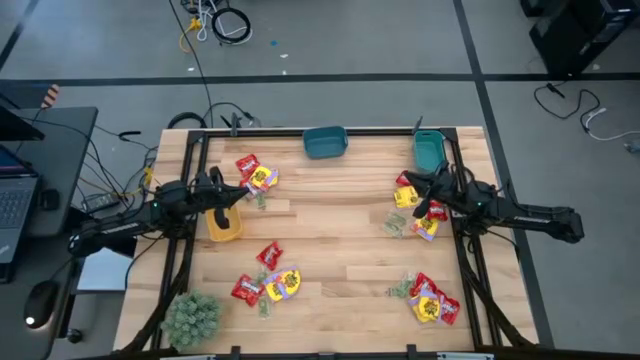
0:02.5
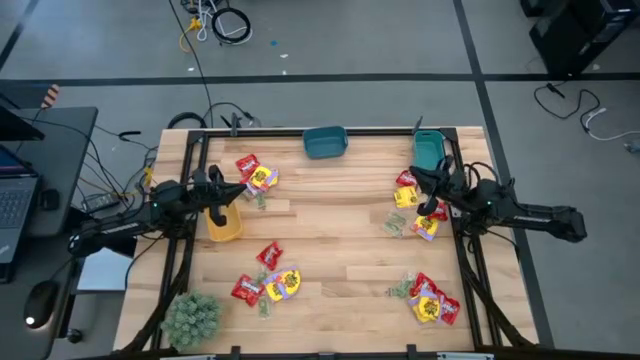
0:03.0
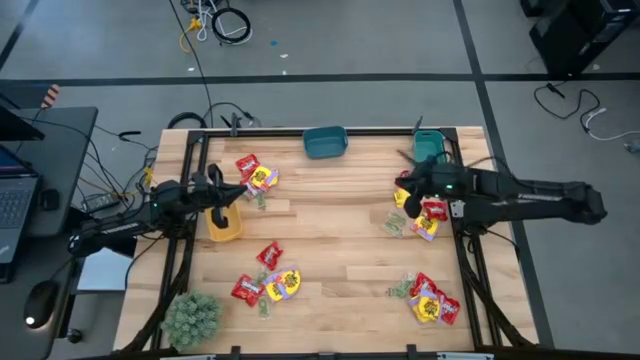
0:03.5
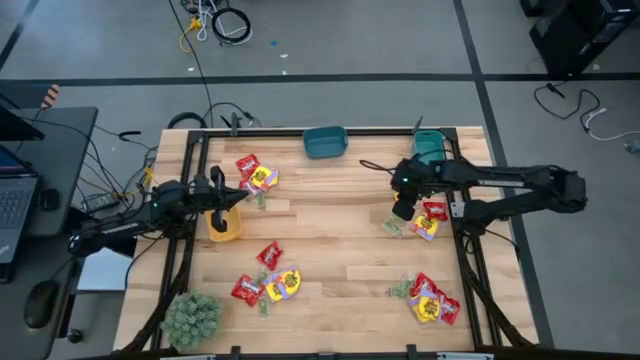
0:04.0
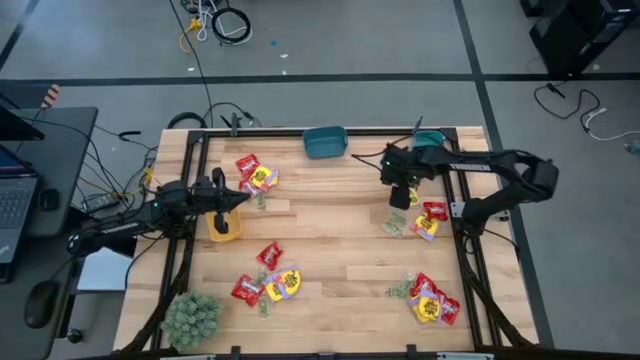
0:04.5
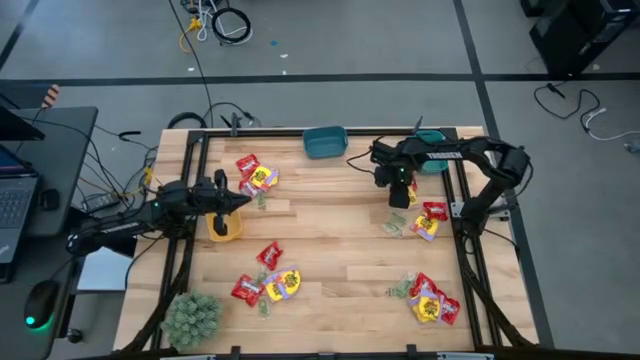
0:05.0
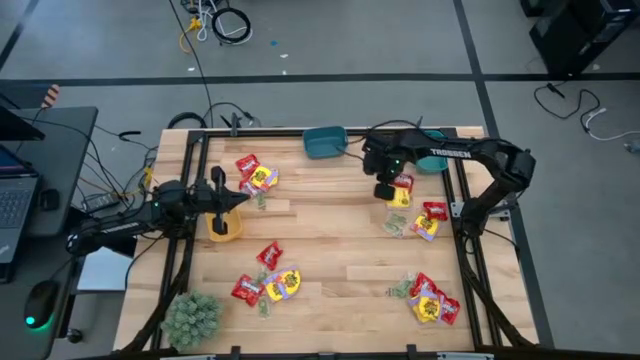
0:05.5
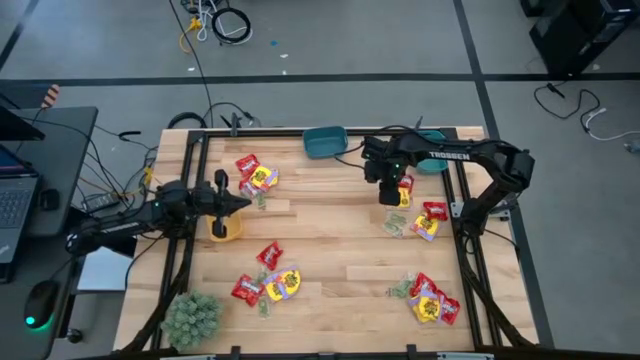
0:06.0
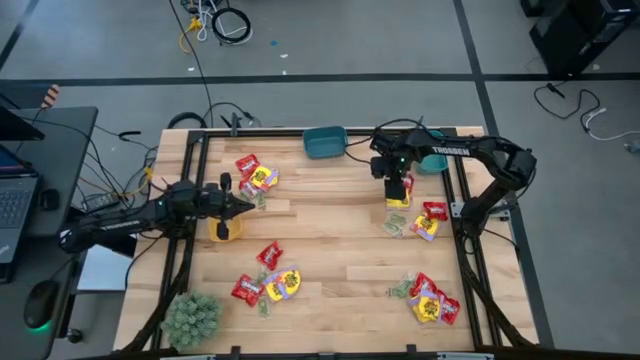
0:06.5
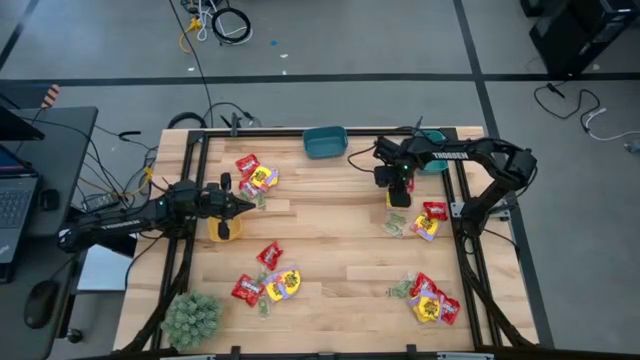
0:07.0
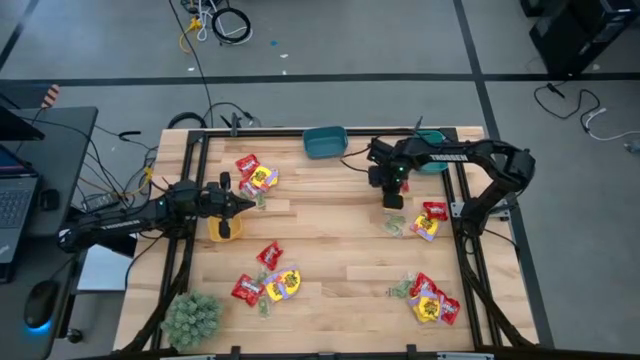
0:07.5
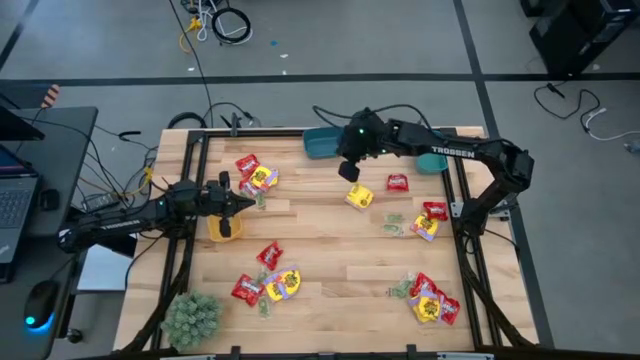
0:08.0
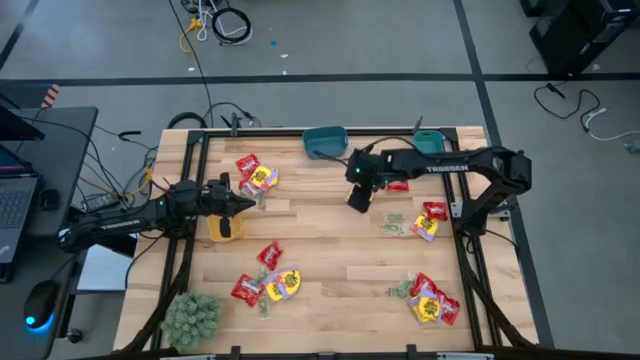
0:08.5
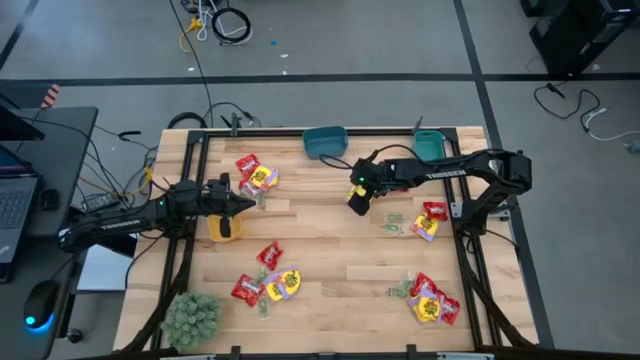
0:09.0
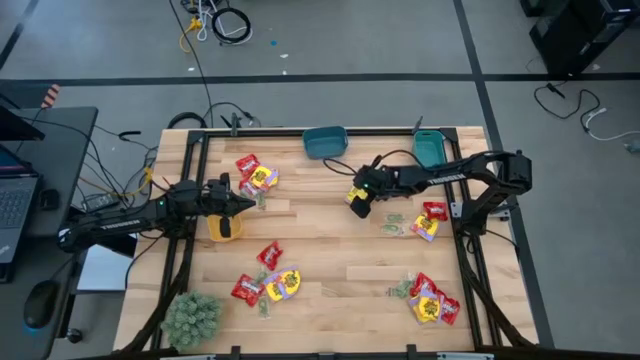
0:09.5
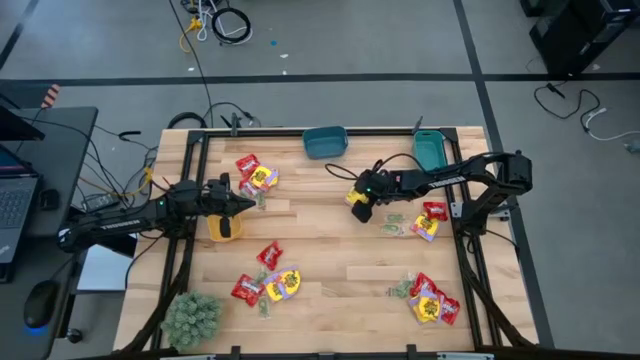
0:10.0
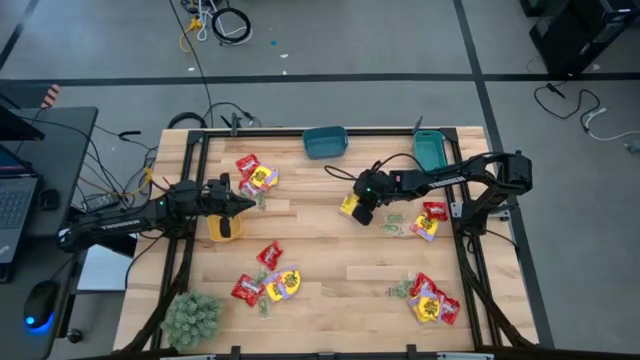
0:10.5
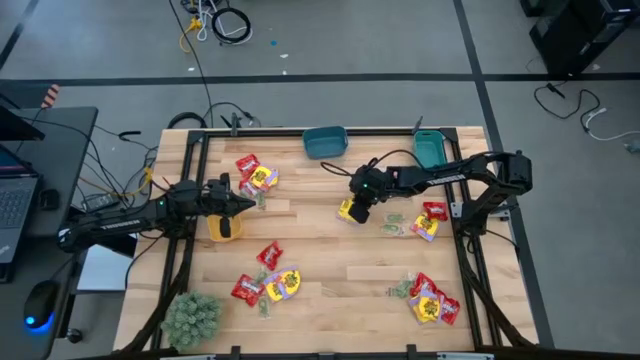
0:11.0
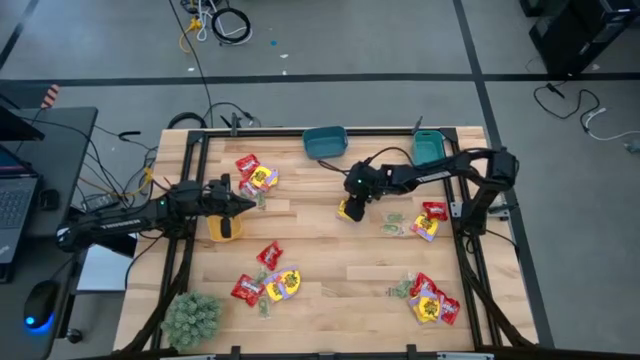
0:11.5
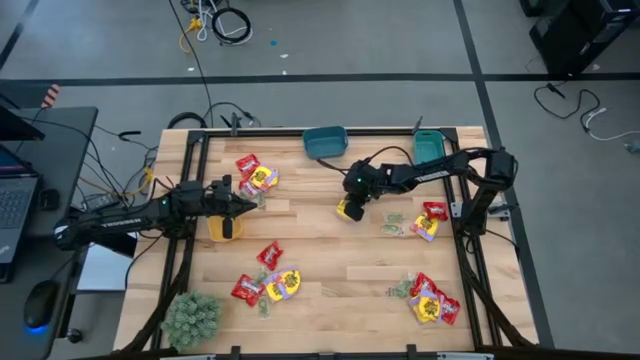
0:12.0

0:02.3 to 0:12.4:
Task: Sort candy
Put the yellow candy into the blue bin

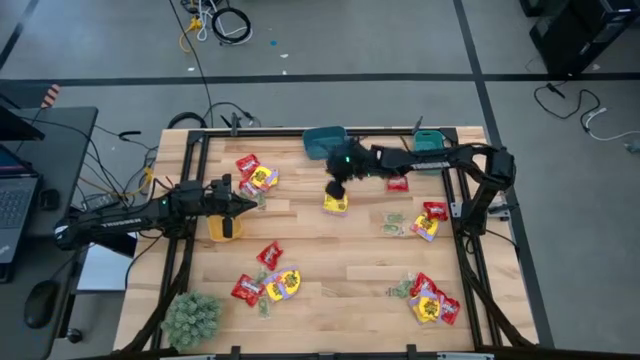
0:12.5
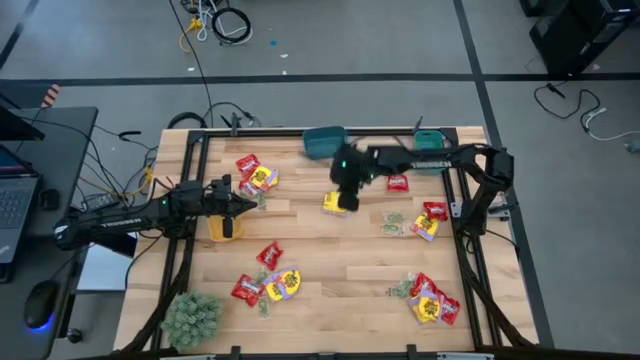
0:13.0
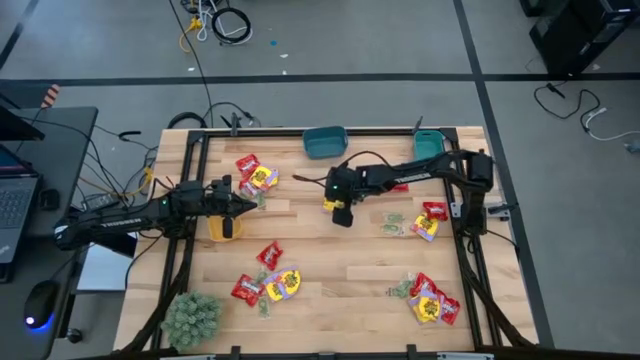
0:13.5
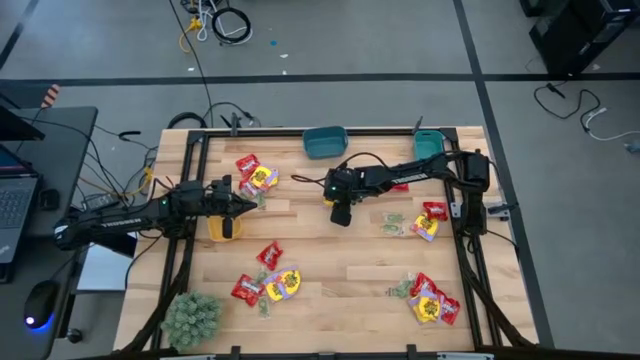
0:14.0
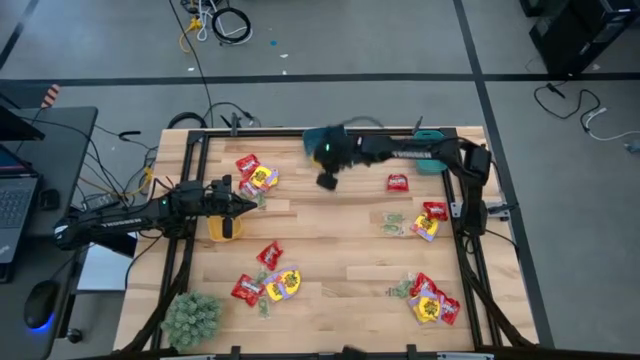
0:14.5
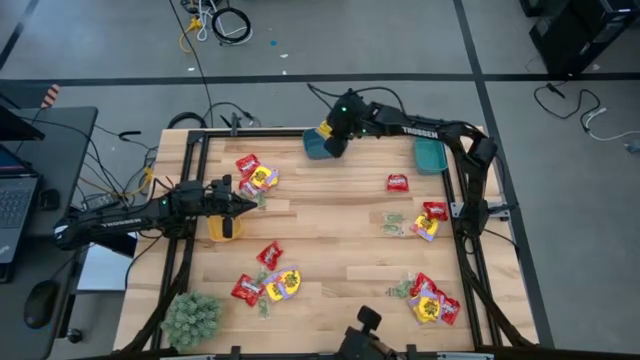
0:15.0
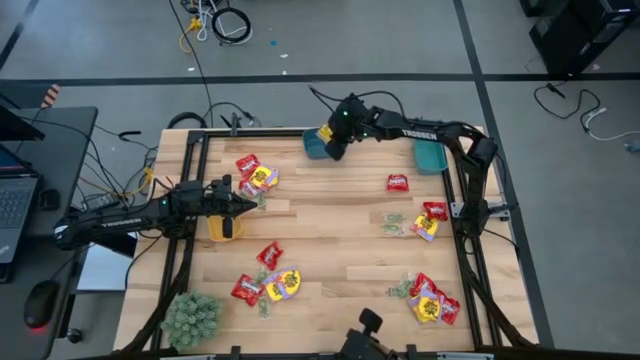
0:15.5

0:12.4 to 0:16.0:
Put the yellow candy into the blue bin

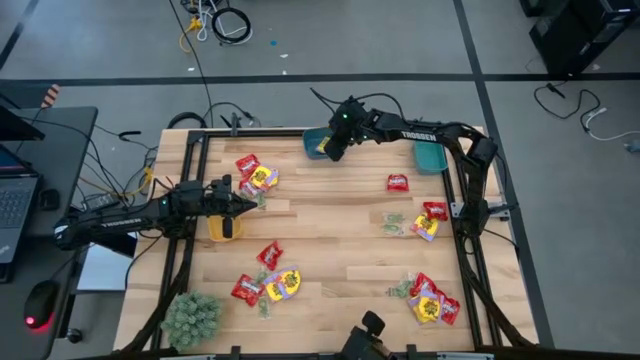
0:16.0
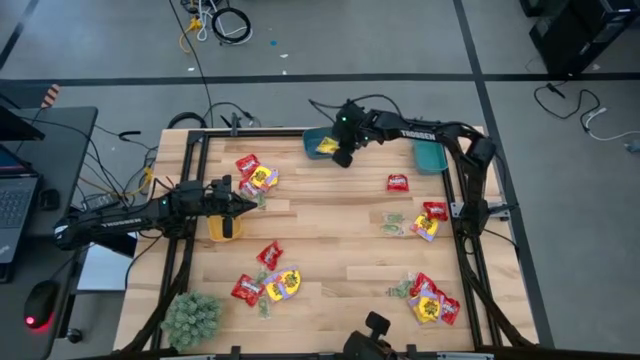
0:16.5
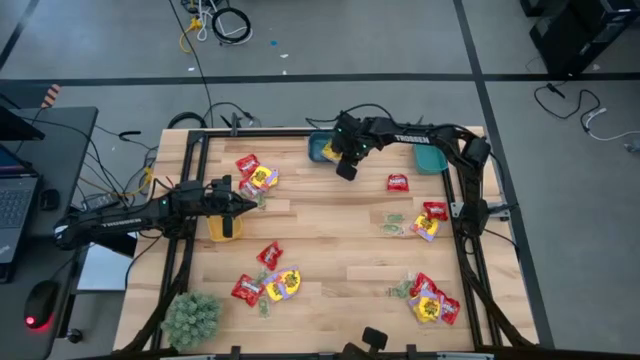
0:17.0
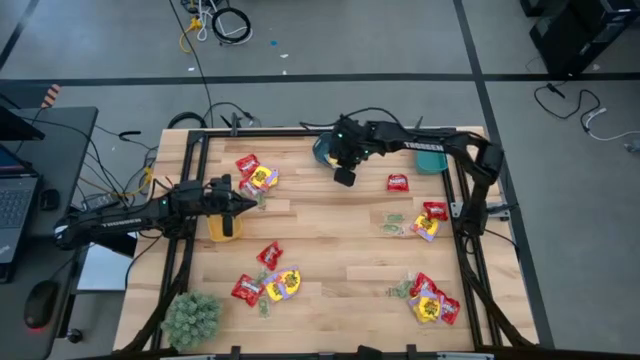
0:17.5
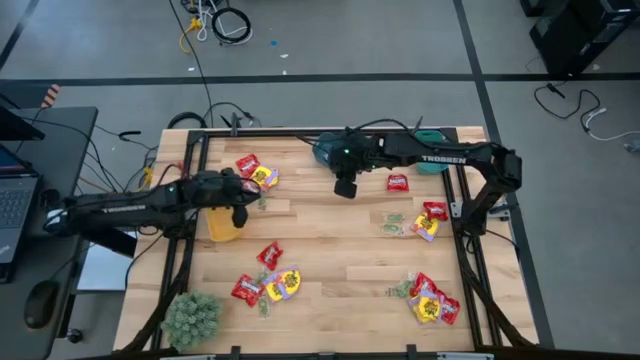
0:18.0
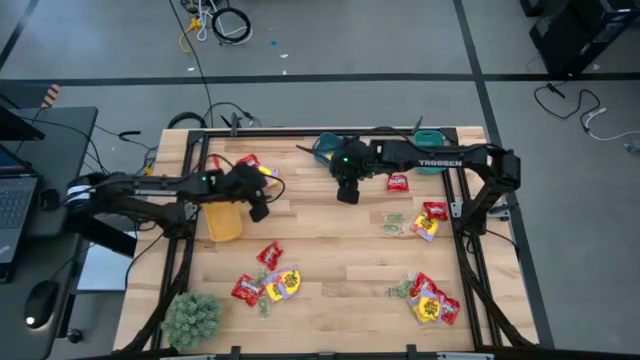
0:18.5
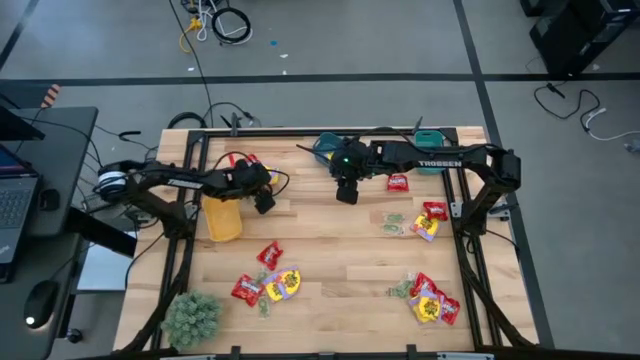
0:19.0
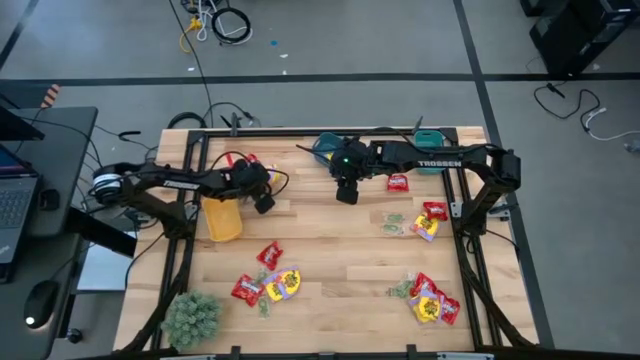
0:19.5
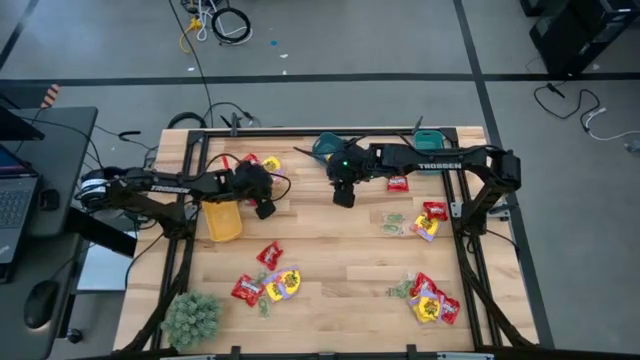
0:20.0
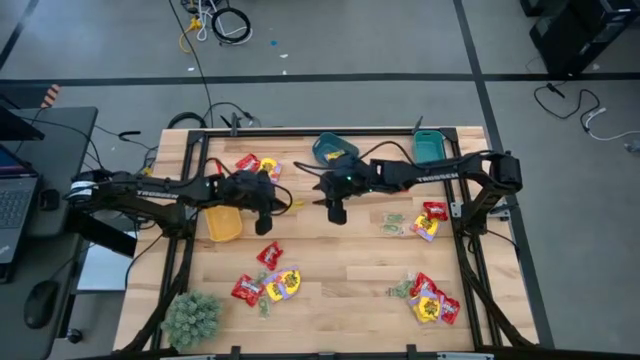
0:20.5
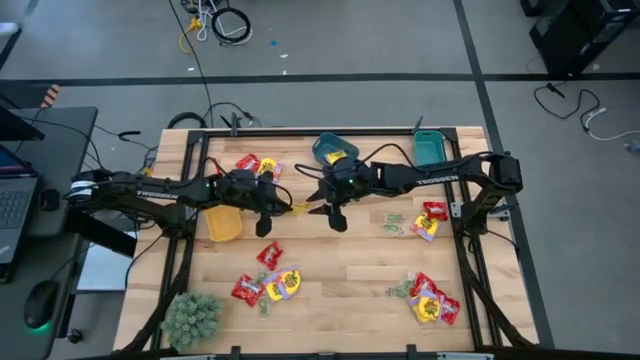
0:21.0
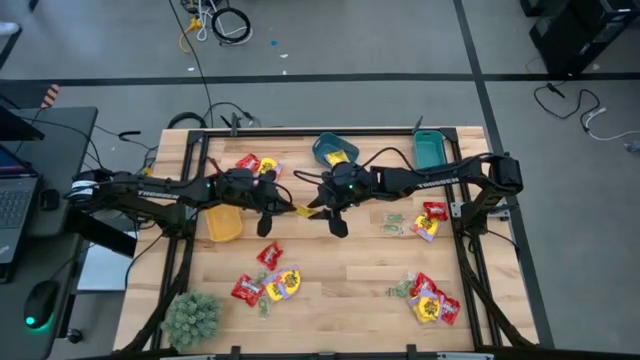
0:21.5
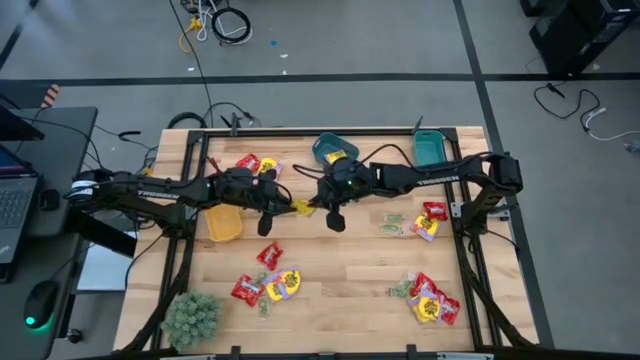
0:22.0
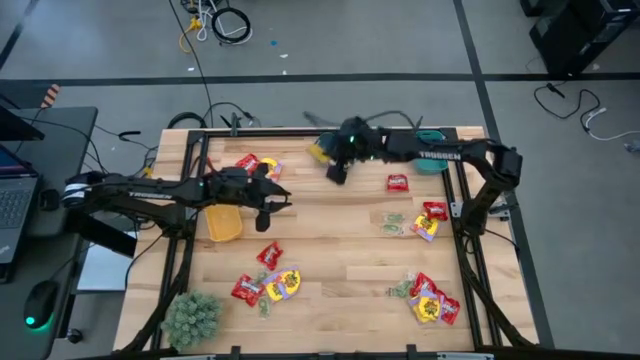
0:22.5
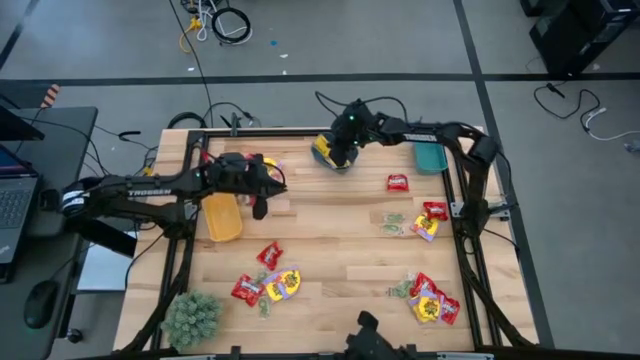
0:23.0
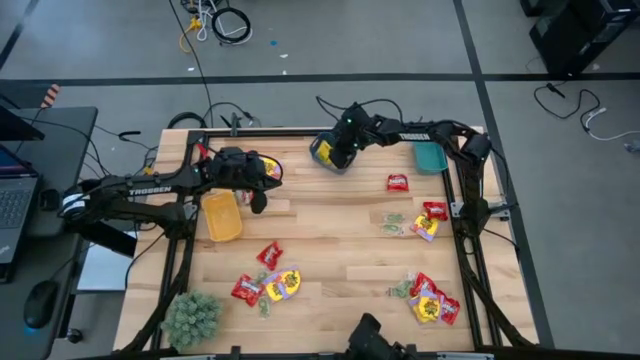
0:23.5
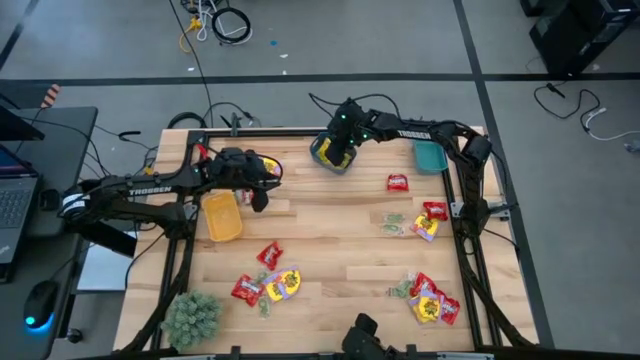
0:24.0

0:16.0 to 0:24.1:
Put the yellow candy into the blue bin
